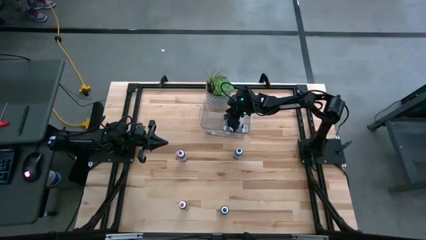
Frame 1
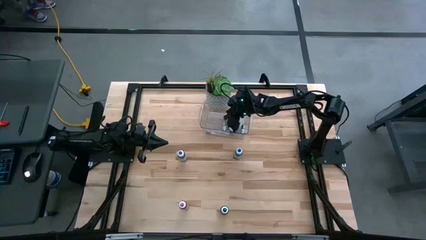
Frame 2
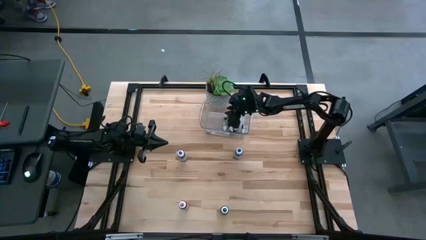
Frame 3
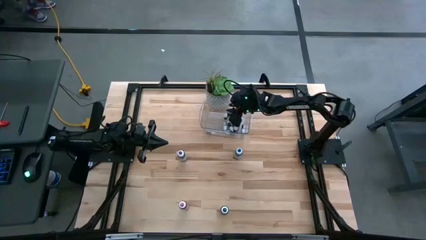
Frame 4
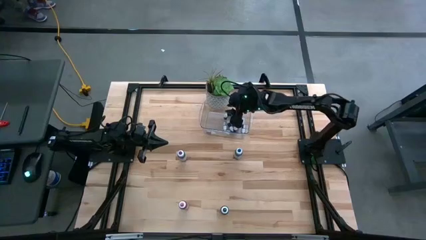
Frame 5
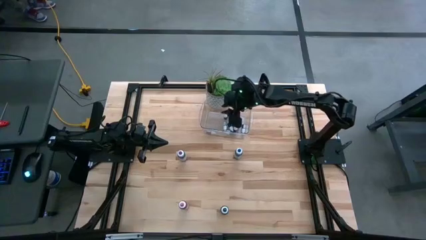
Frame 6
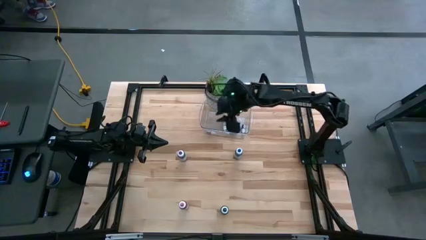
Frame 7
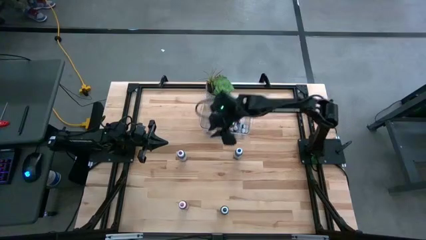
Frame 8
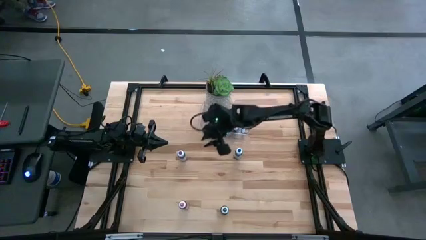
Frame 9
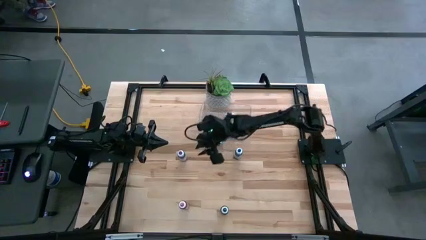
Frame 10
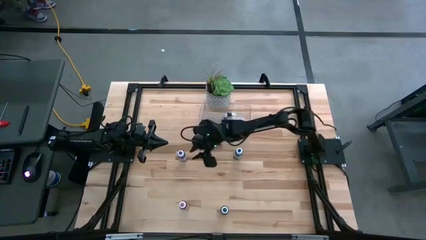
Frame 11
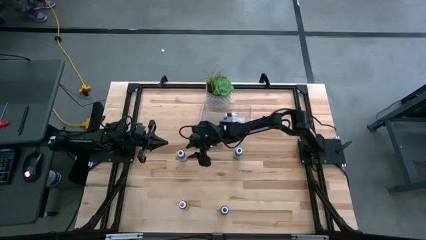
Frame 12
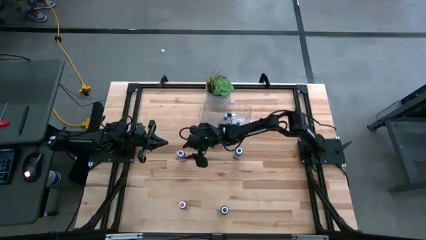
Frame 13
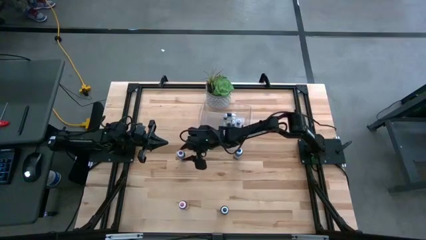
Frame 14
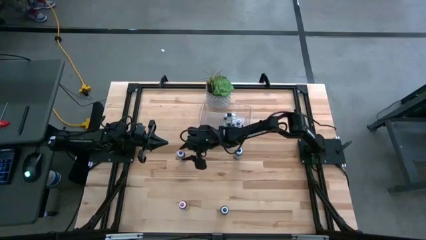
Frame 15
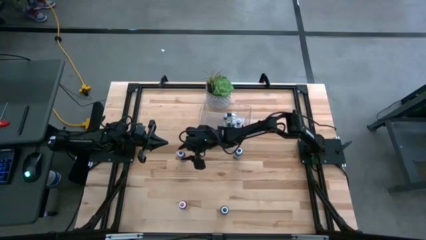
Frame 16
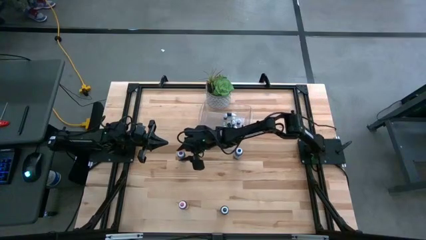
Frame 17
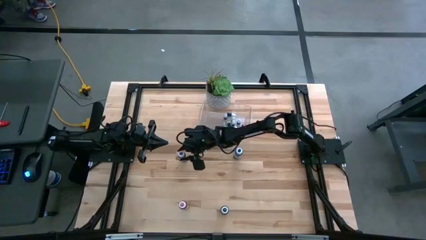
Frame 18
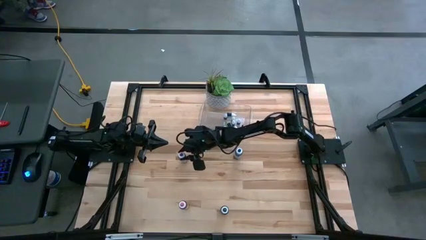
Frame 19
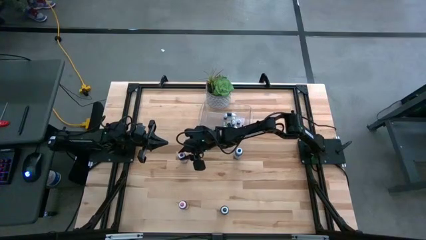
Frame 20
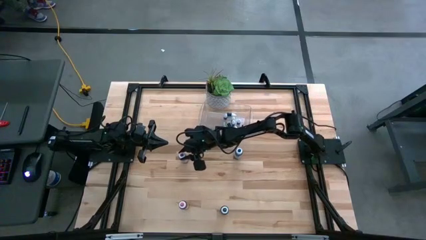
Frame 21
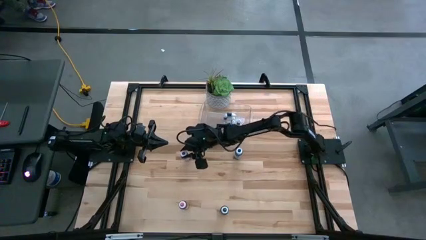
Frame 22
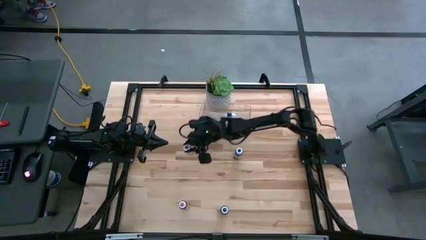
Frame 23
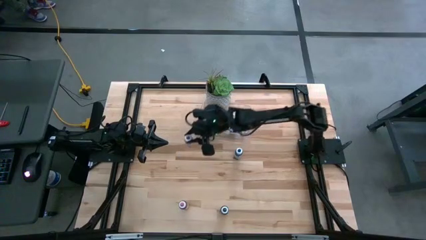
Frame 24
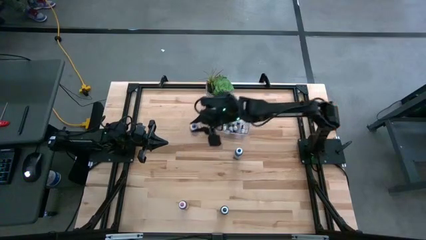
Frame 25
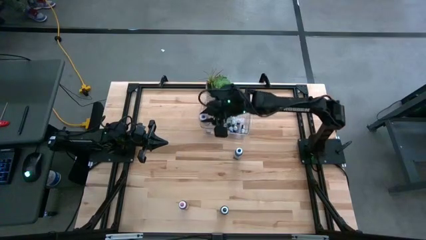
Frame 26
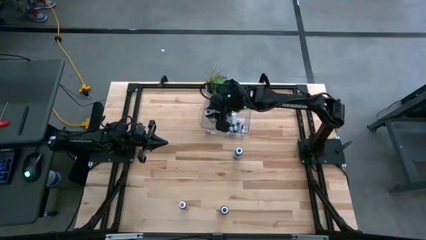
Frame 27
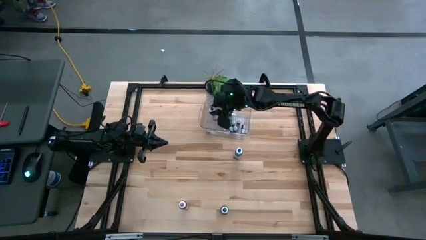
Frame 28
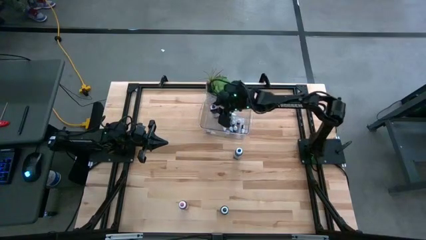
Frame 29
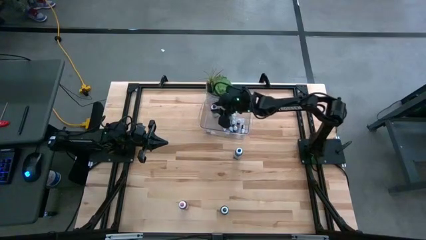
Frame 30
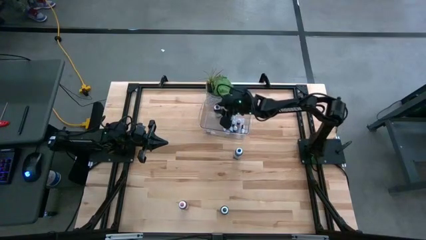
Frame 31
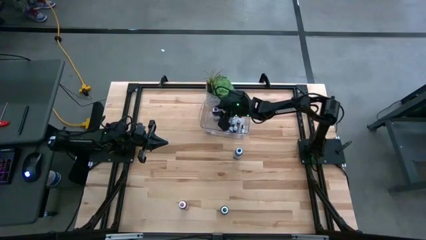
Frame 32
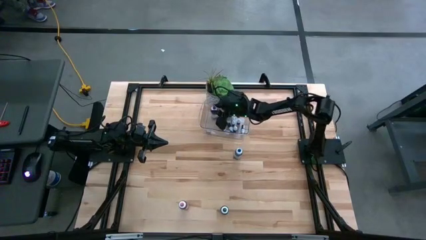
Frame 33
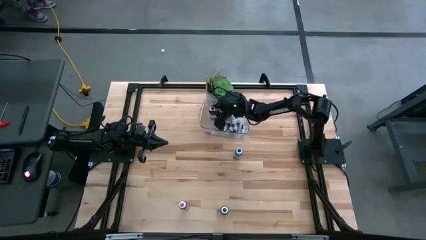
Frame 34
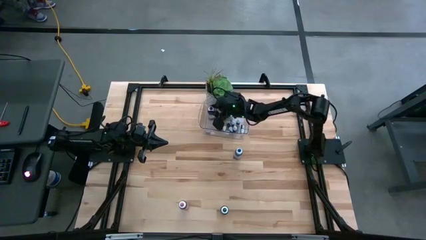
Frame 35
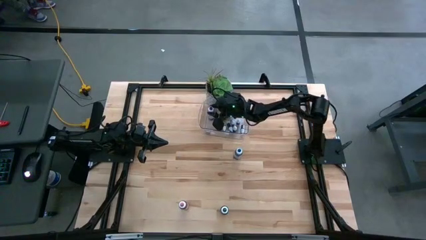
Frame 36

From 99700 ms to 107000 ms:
Task: Pick & Place food coloring
Put the large purple food coloring bottle into the bin

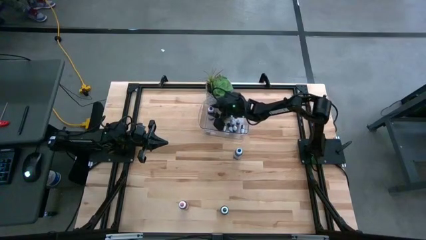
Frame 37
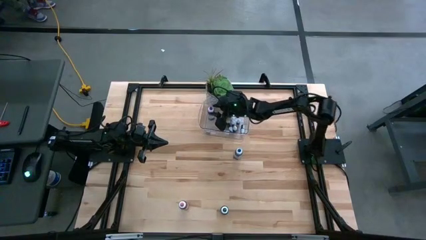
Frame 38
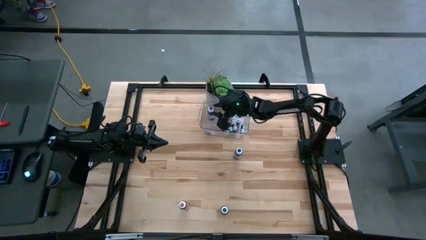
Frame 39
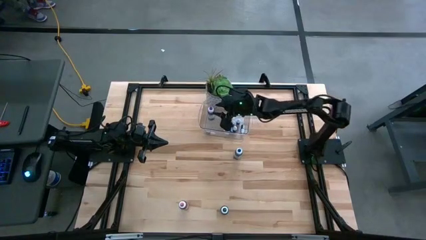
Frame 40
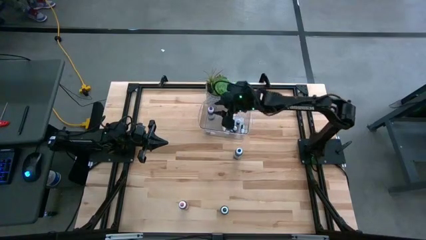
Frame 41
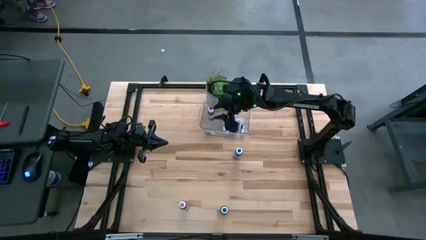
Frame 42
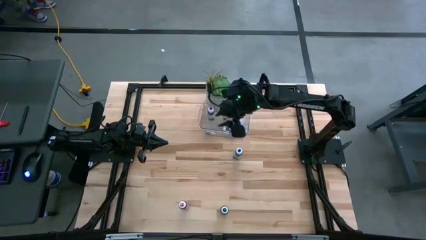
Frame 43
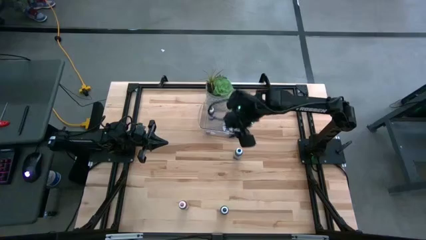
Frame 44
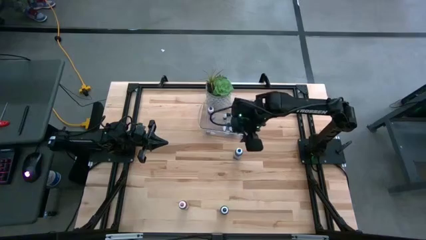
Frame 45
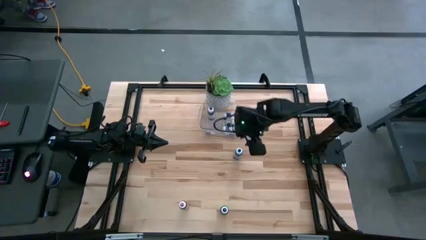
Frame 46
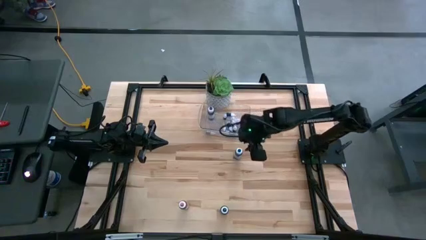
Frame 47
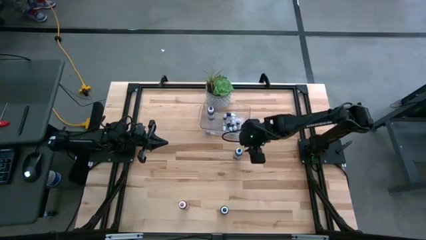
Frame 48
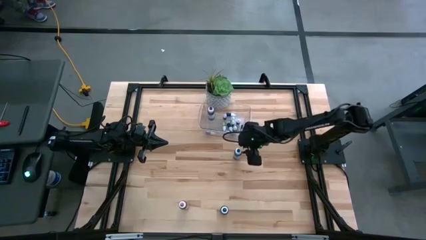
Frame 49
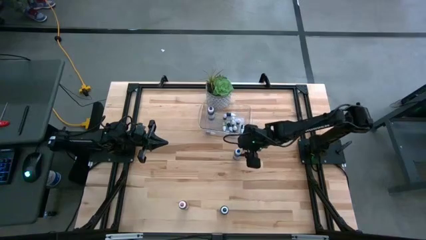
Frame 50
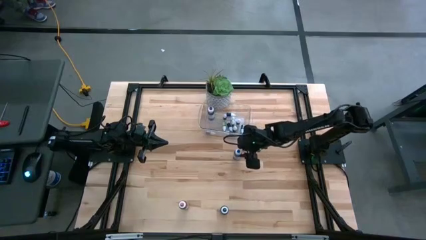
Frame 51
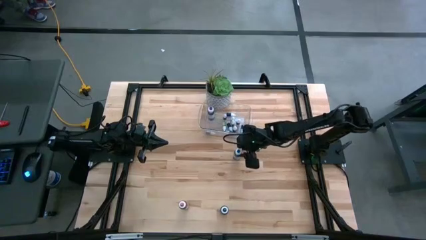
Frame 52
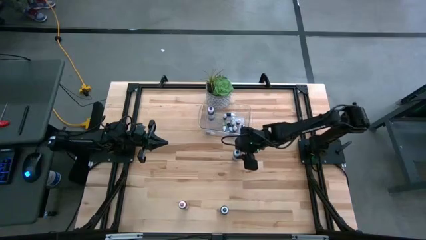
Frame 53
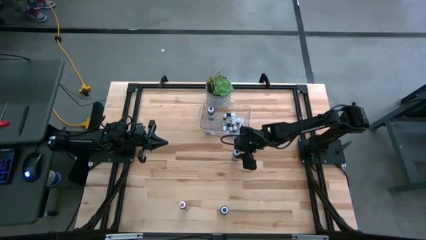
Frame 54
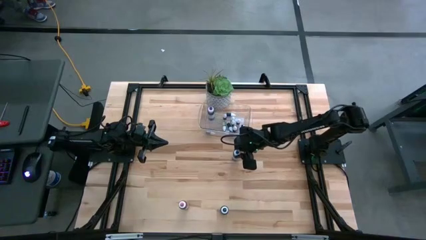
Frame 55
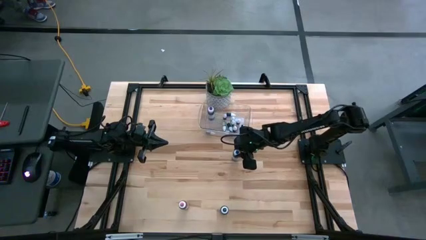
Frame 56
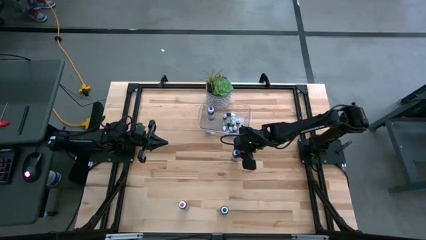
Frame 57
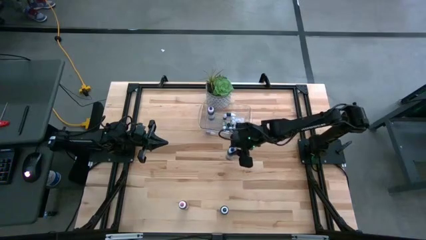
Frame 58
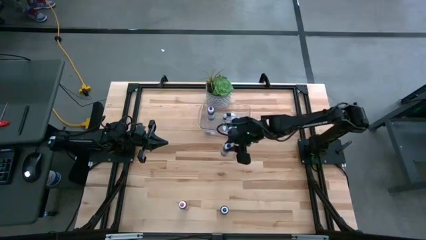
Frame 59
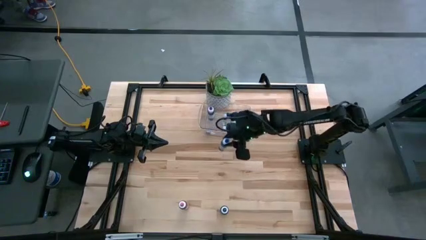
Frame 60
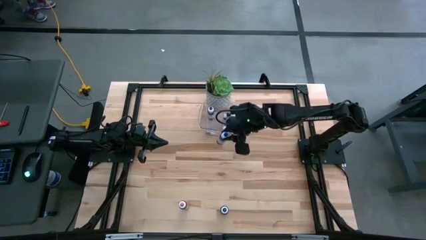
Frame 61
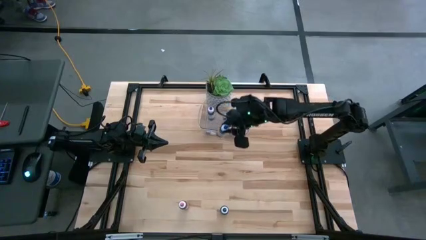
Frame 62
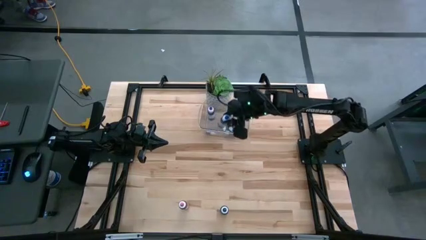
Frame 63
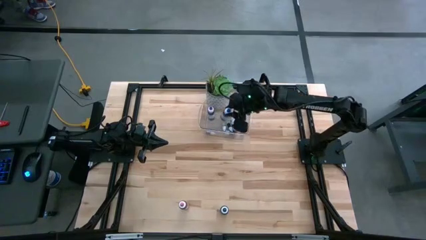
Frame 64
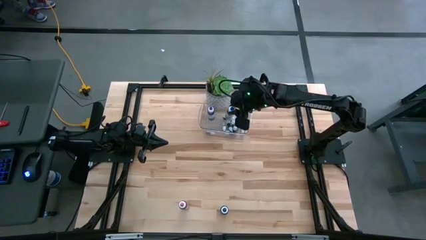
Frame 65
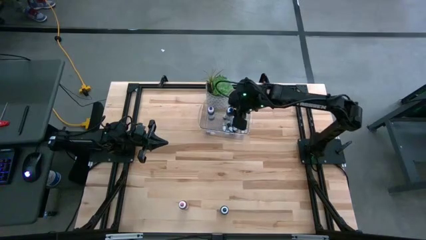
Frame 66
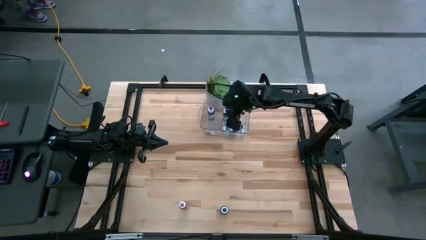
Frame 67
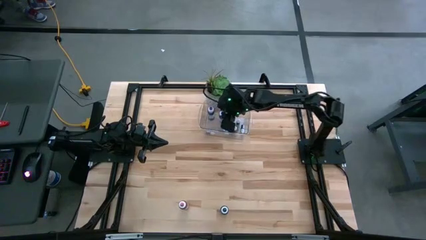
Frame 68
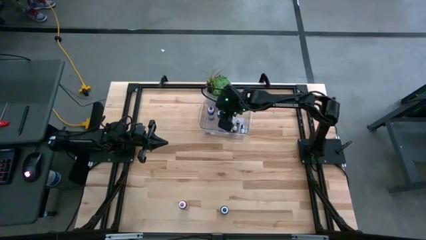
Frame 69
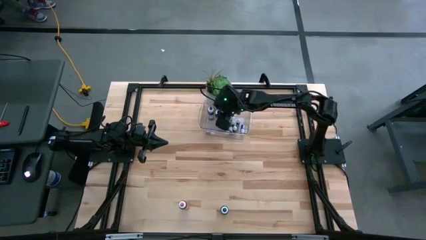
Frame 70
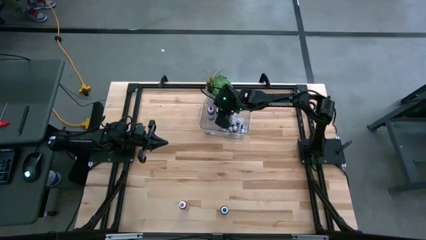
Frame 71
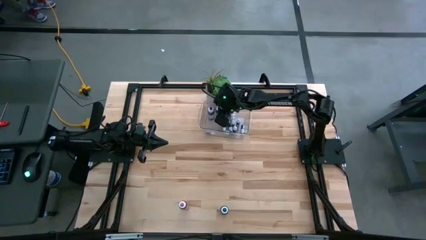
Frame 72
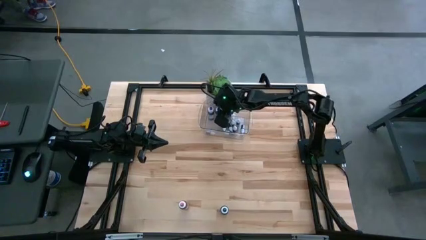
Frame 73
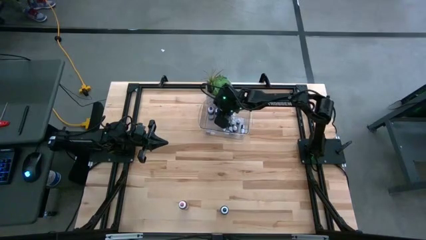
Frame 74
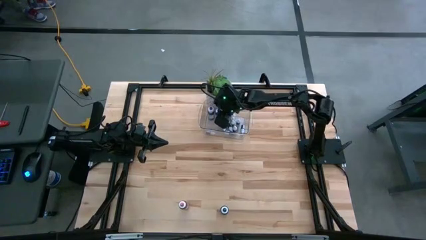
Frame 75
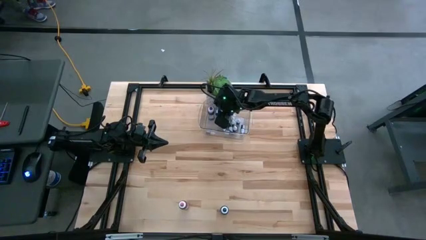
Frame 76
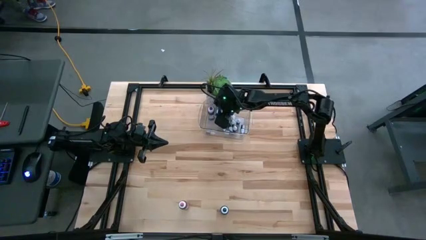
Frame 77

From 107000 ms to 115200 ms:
Put the large blue food coloring bottle into the bin
